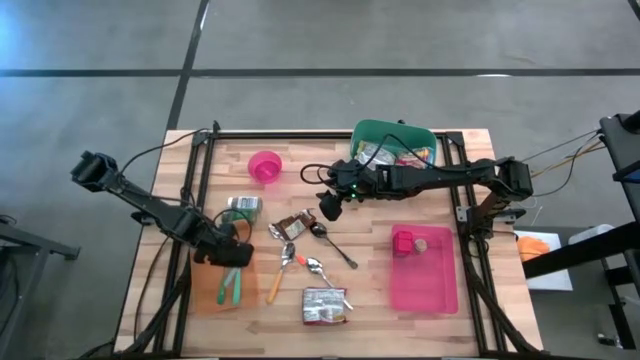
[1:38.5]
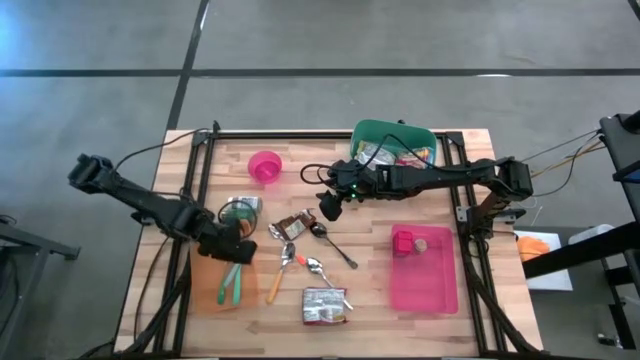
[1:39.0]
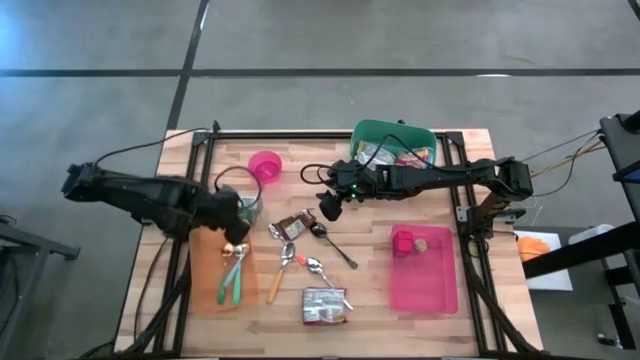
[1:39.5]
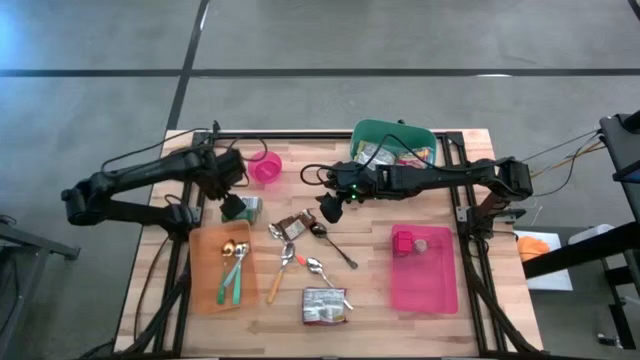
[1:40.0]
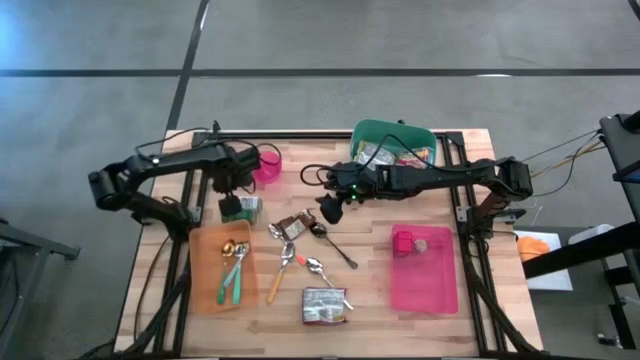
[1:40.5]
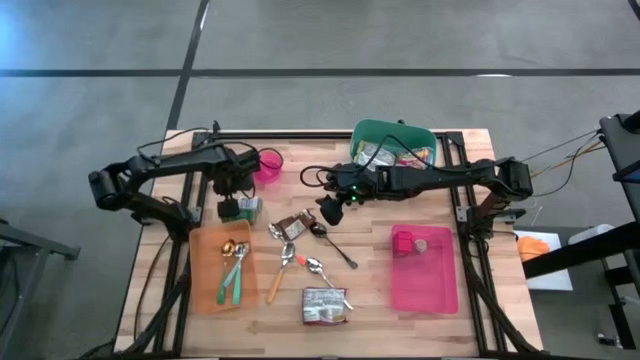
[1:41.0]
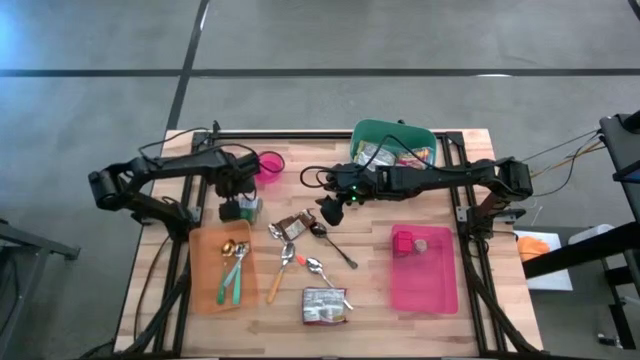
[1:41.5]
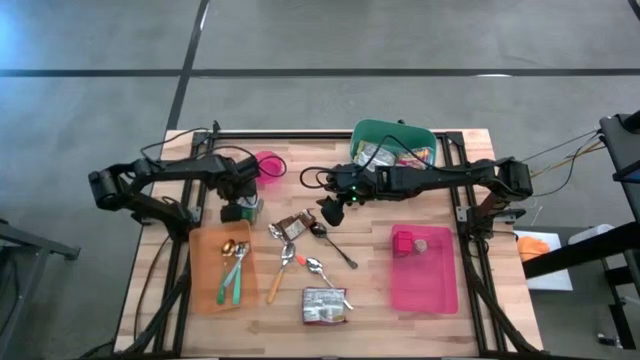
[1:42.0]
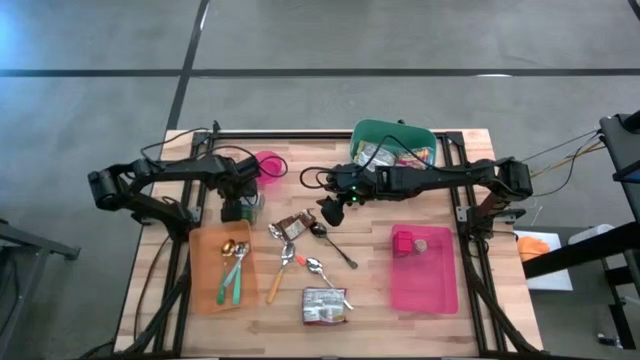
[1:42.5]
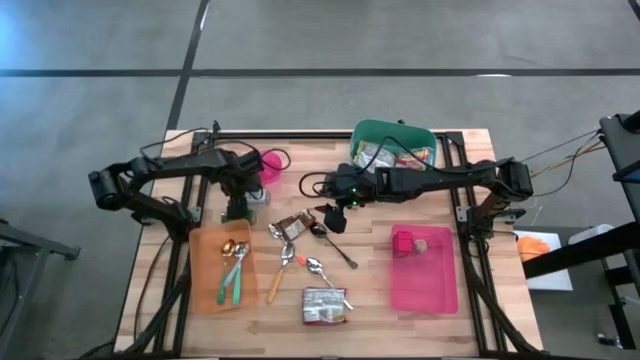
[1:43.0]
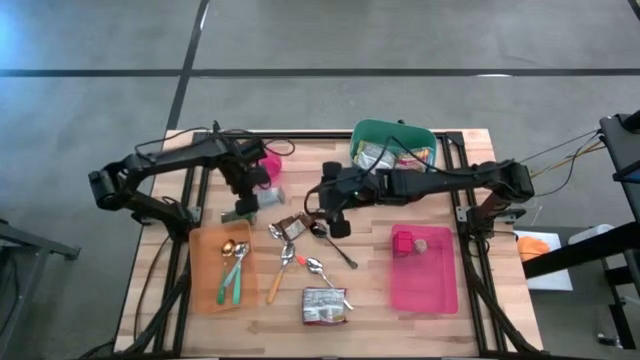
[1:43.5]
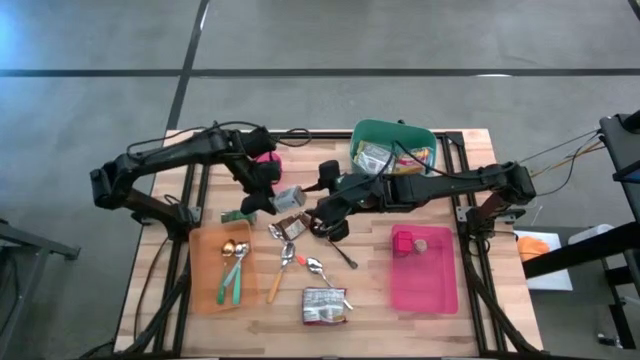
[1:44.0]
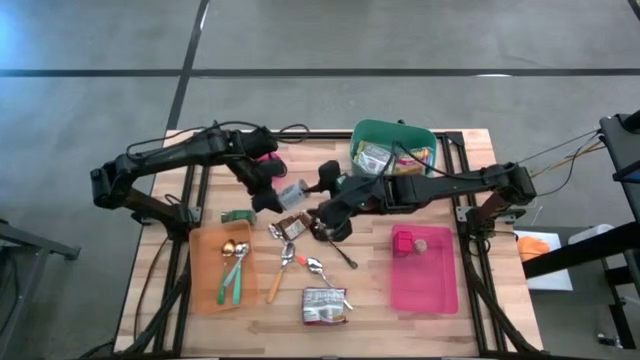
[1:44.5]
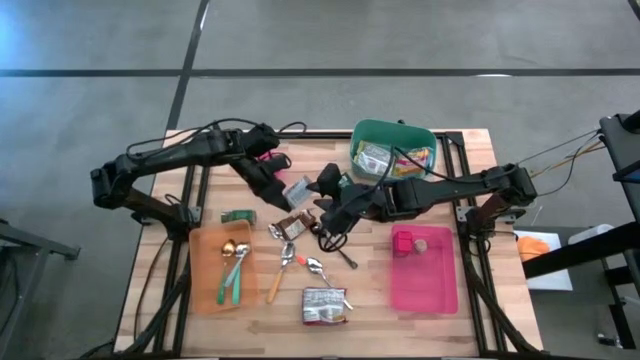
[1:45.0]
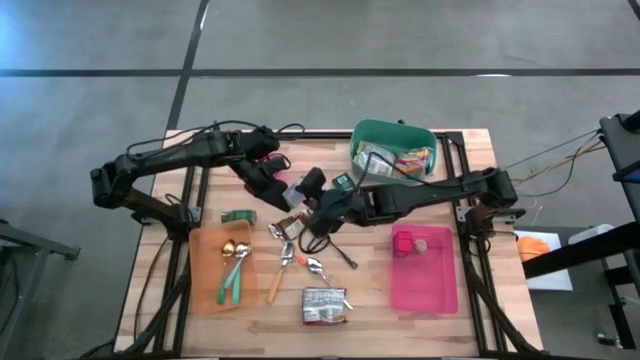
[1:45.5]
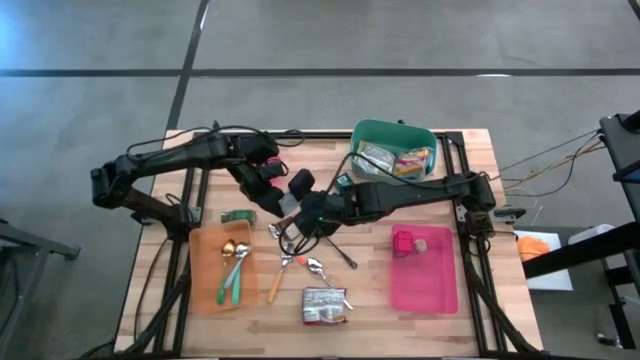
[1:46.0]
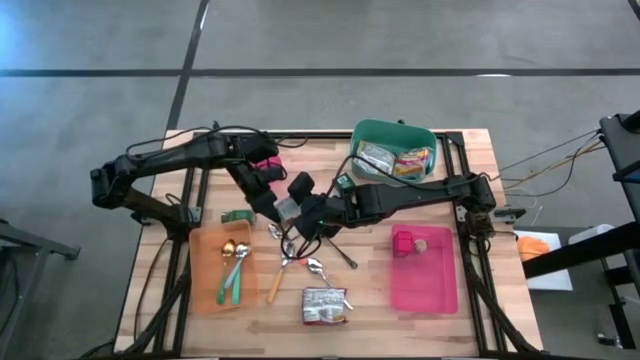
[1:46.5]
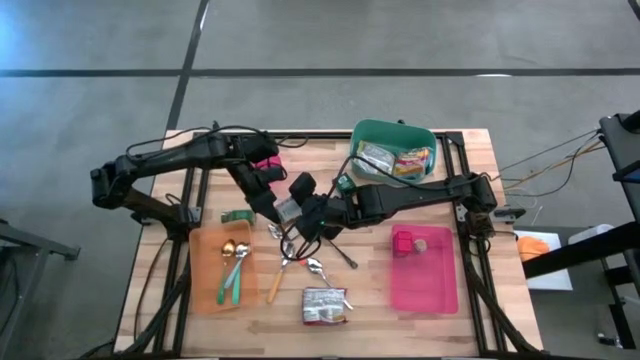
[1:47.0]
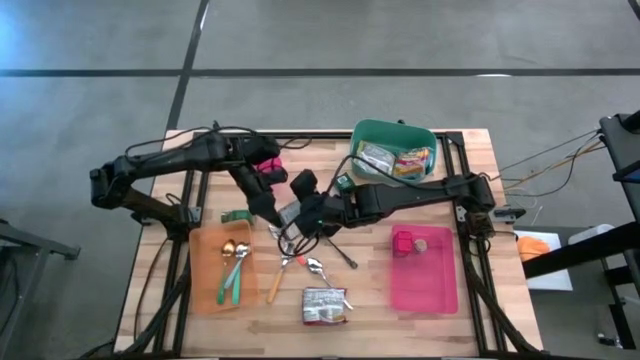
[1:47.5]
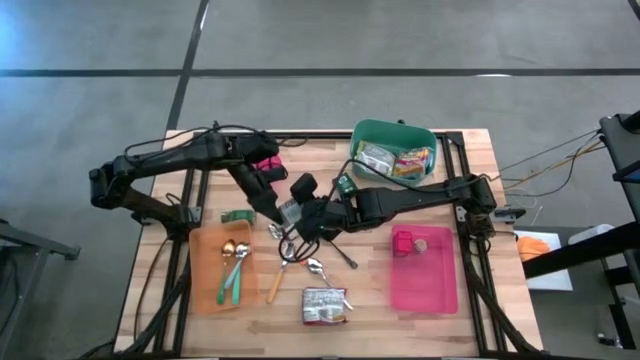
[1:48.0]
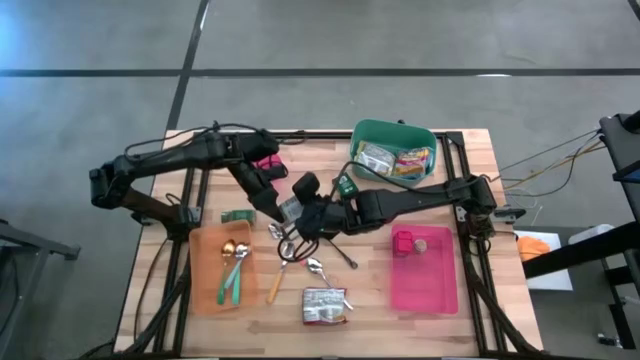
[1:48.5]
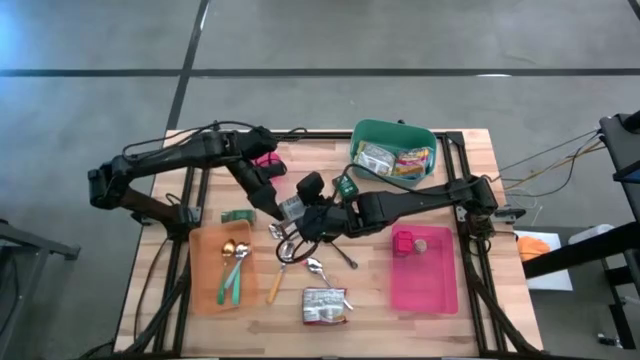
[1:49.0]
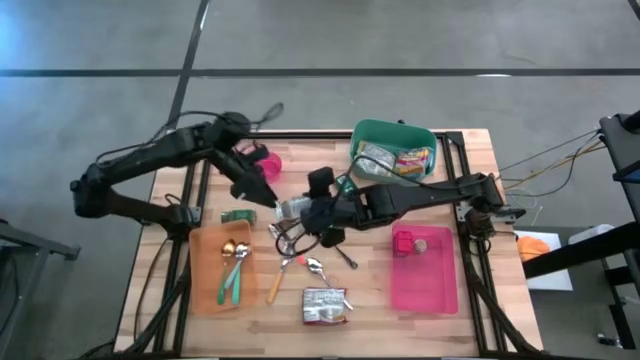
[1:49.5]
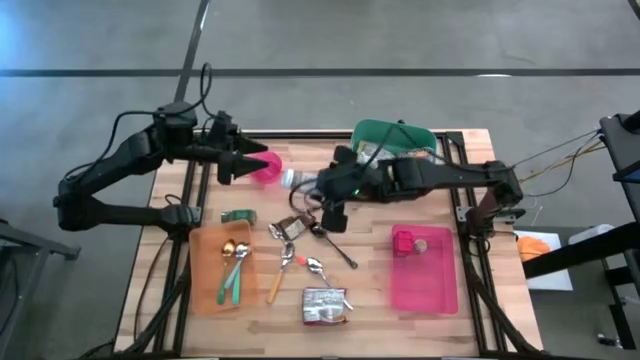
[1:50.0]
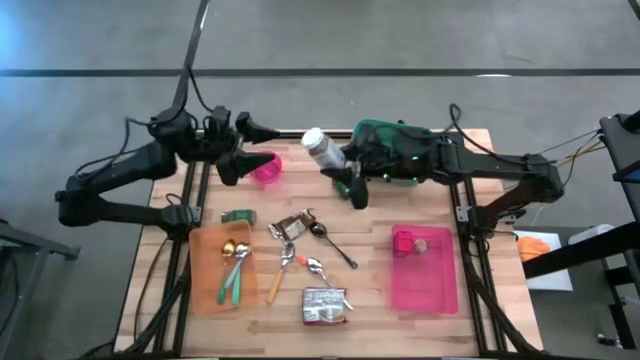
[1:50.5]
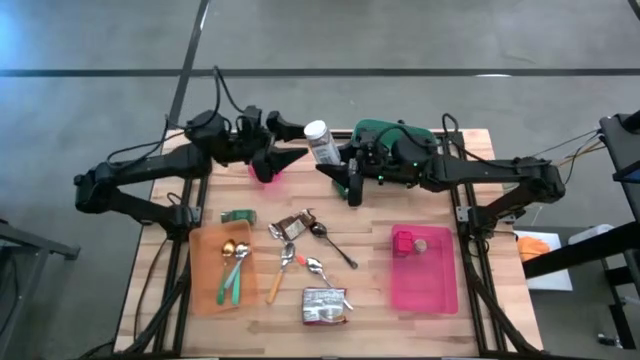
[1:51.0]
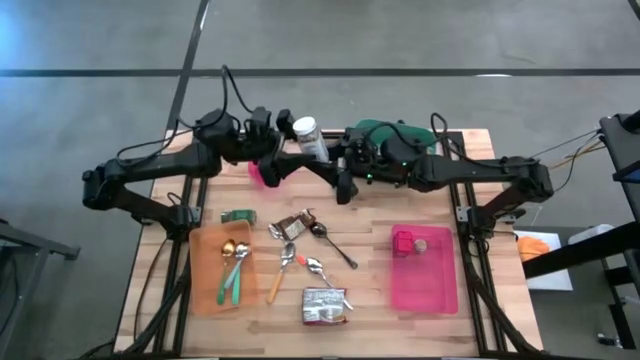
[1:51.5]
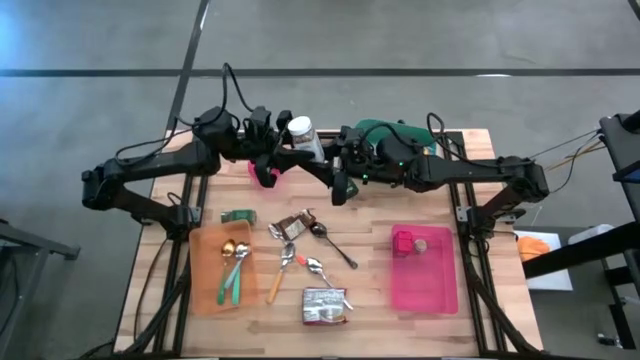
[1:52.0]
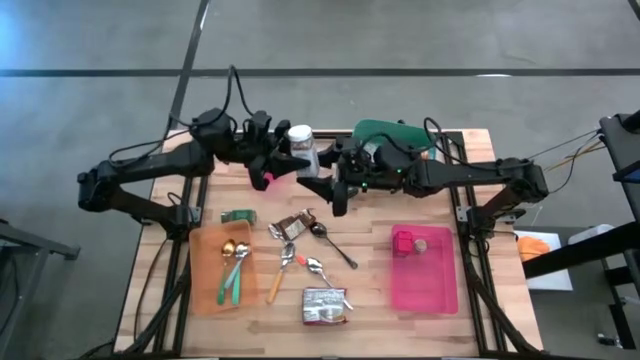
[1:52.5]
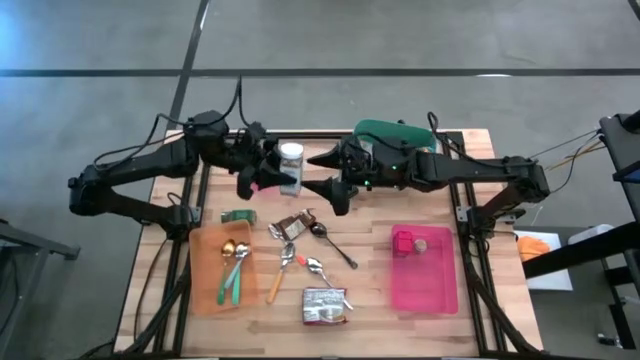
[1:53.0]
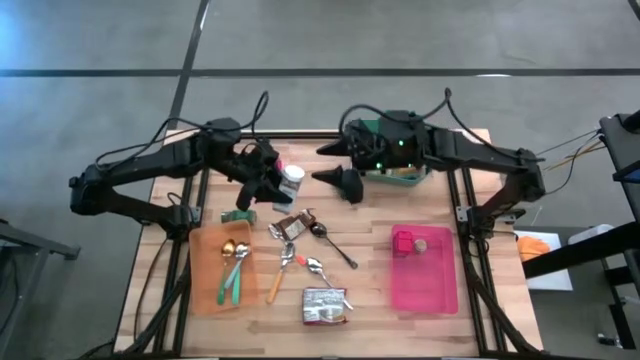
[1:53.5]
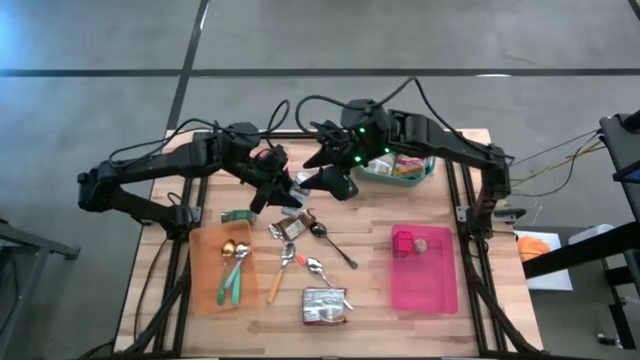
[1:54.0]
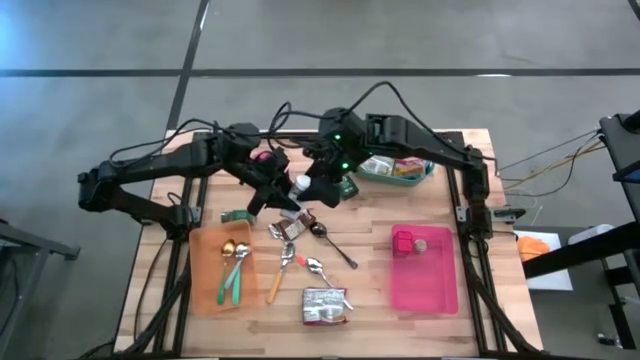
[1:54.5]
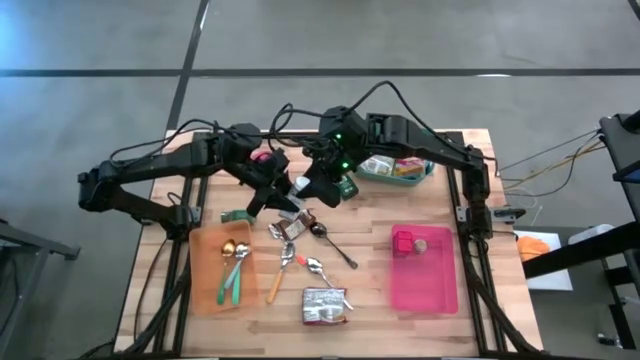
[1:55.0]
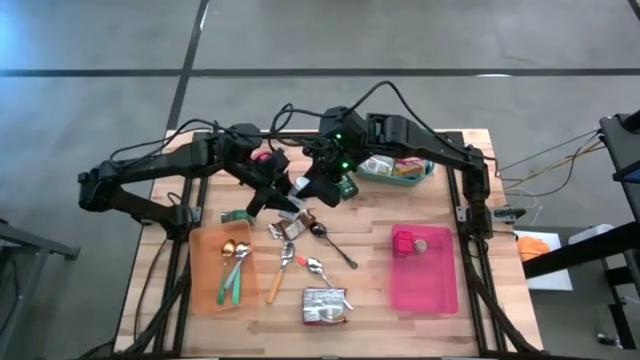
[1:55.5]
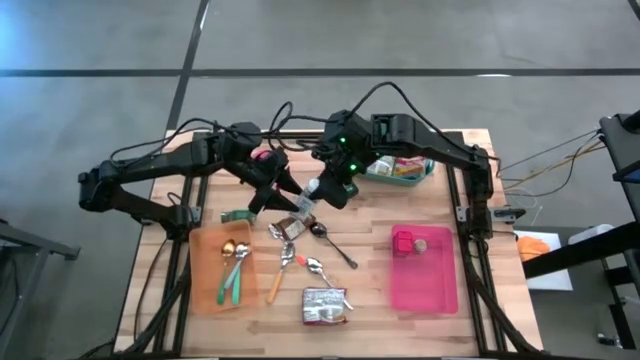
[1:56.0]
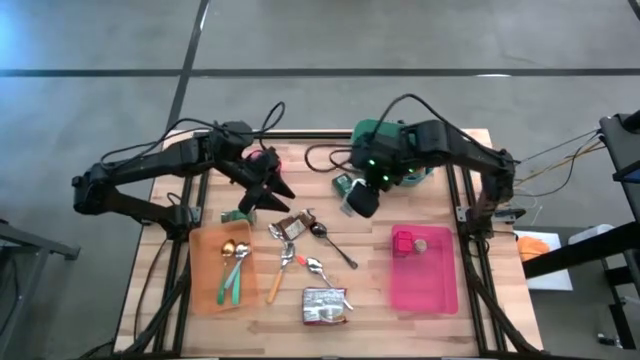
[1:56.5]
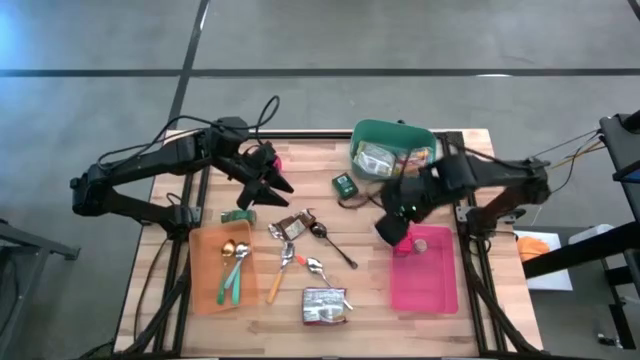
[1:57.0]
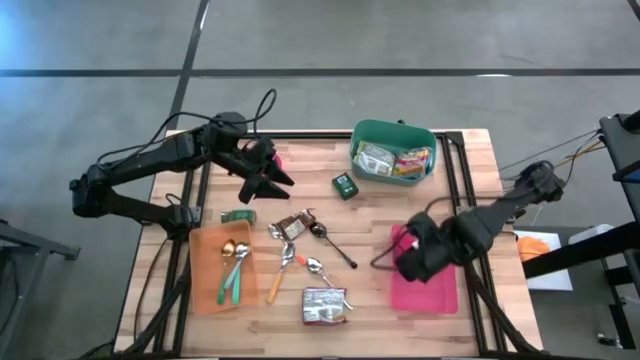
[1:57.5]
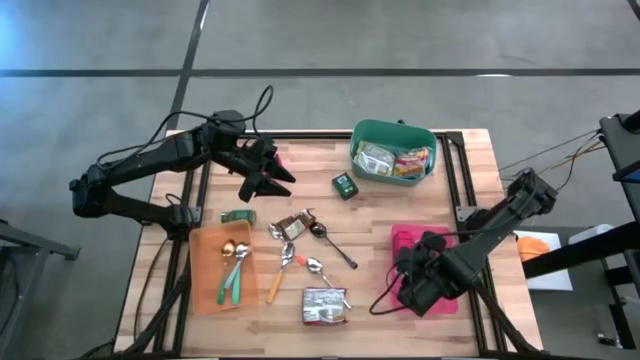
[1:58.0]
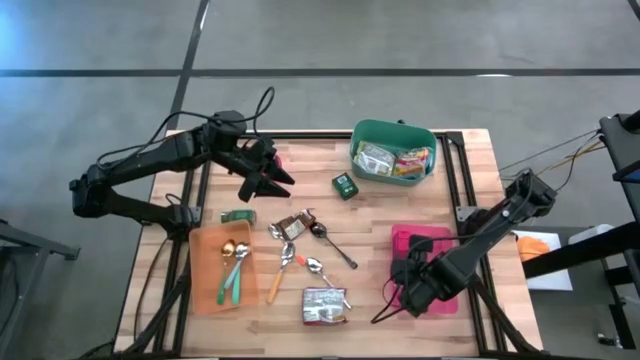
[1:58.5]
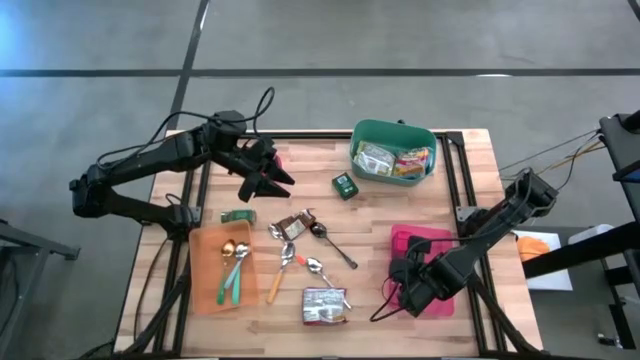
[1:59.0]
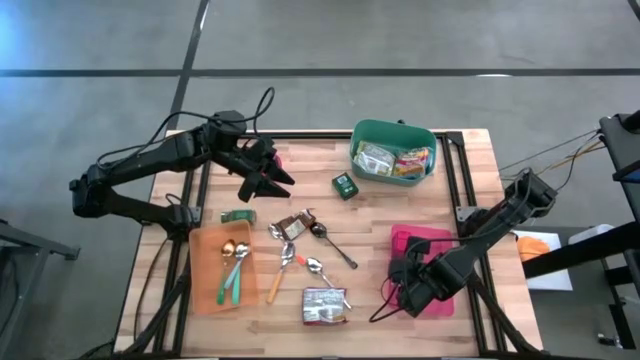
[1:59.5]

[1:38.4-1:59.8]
Task: Pick & Place Food Item
Put the white seasoning bottle into the pink bin
